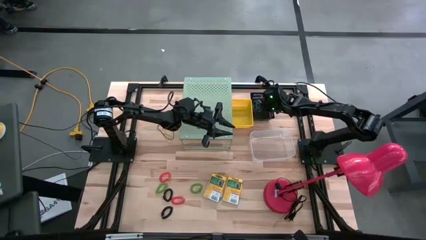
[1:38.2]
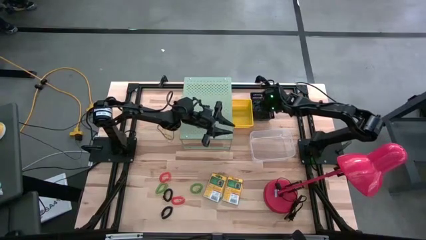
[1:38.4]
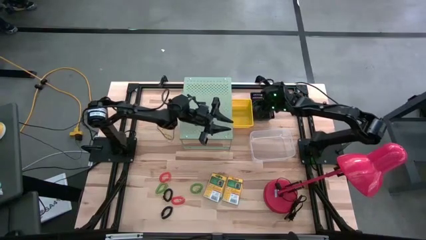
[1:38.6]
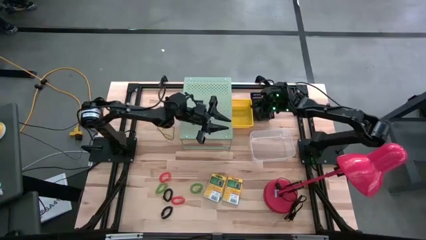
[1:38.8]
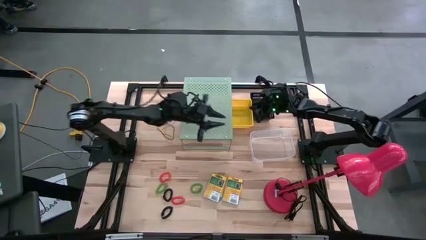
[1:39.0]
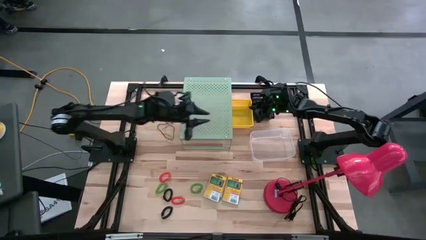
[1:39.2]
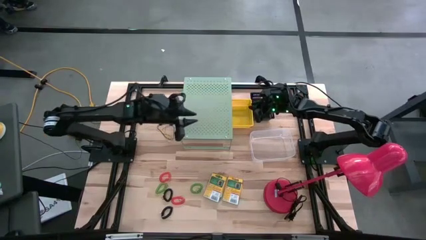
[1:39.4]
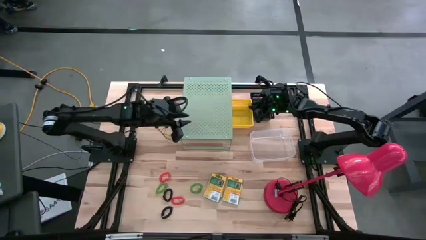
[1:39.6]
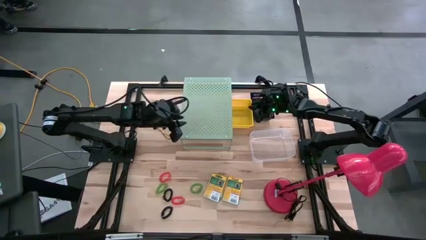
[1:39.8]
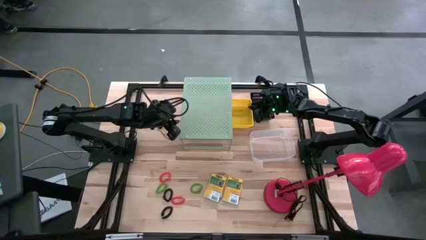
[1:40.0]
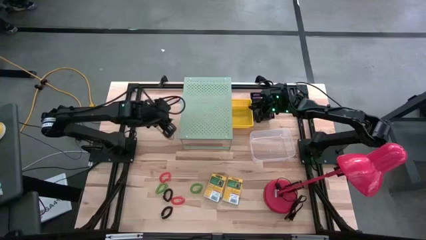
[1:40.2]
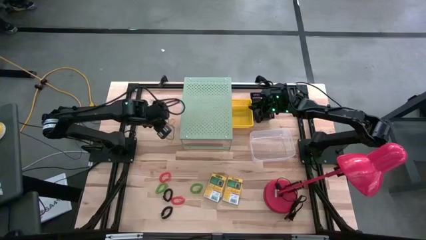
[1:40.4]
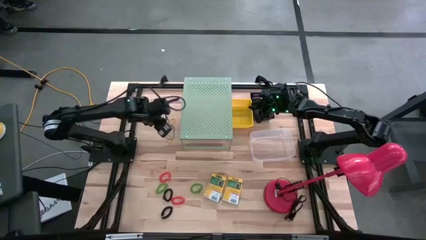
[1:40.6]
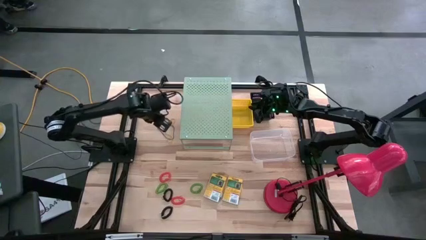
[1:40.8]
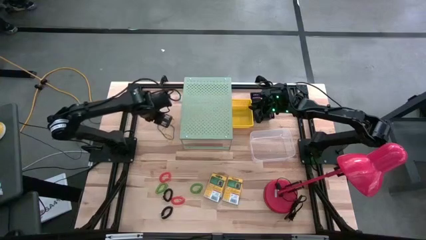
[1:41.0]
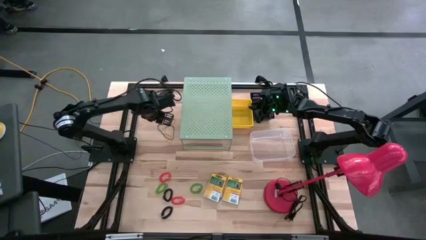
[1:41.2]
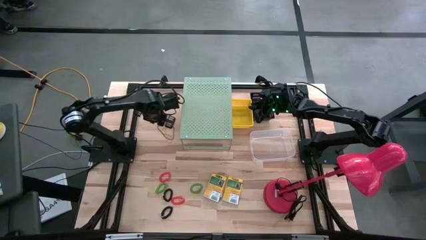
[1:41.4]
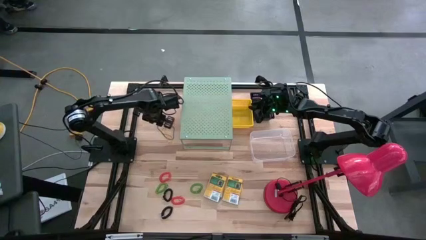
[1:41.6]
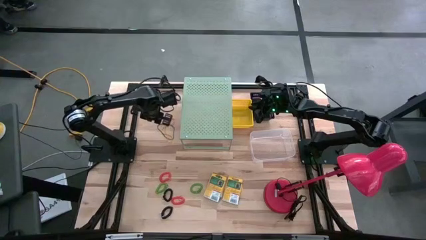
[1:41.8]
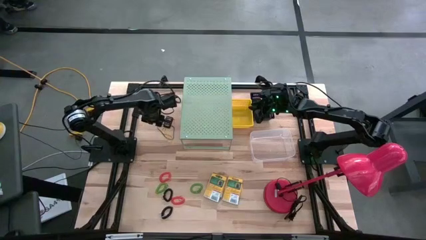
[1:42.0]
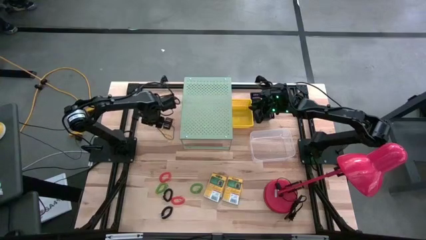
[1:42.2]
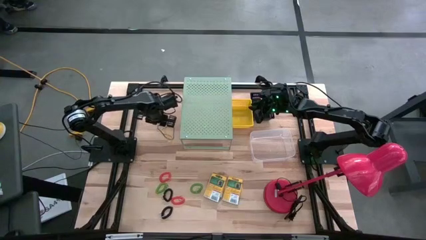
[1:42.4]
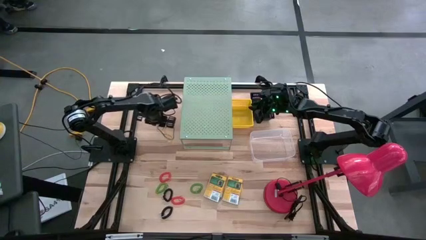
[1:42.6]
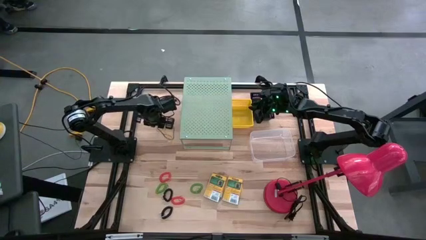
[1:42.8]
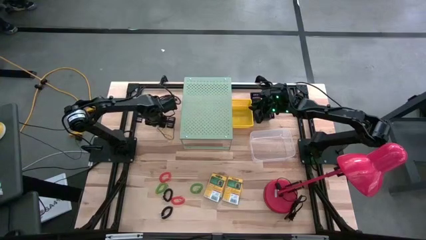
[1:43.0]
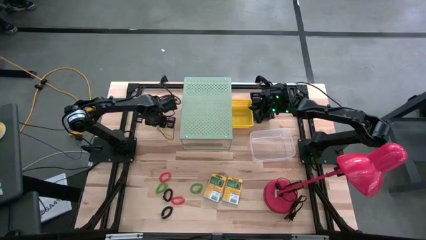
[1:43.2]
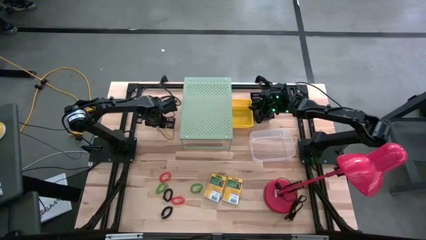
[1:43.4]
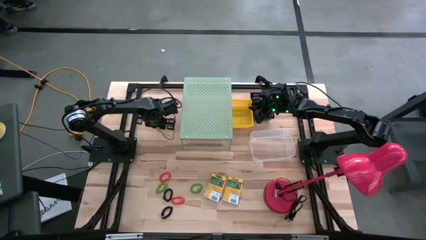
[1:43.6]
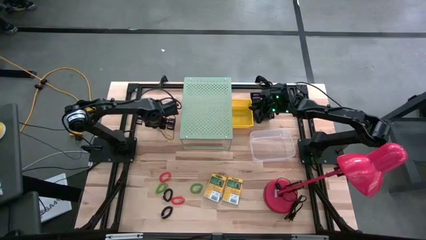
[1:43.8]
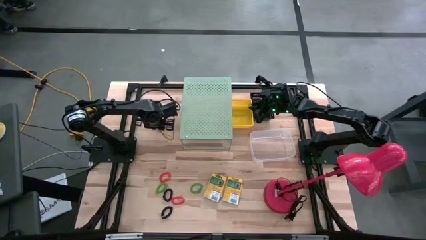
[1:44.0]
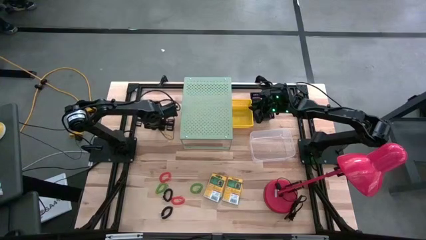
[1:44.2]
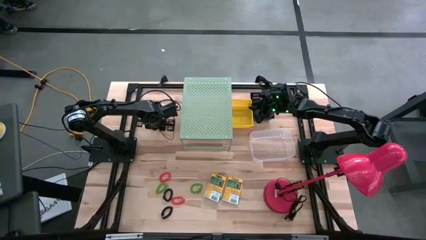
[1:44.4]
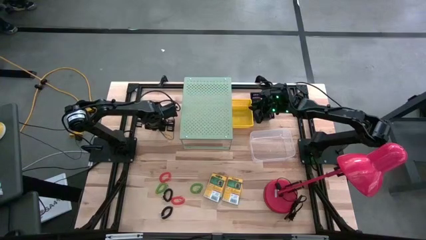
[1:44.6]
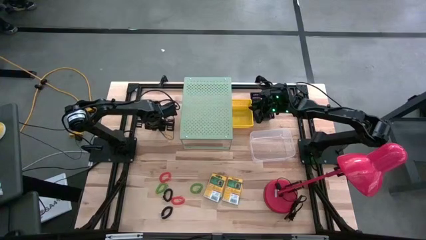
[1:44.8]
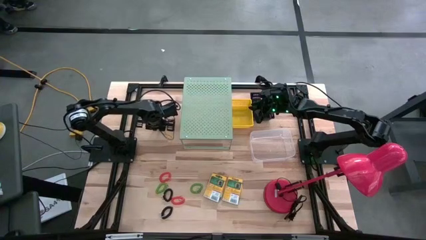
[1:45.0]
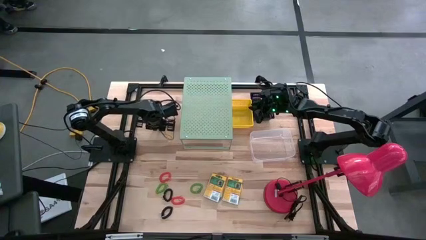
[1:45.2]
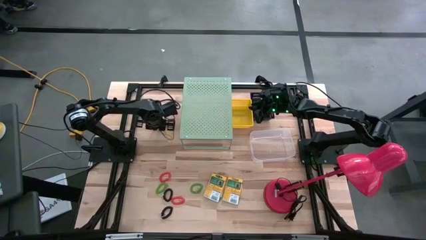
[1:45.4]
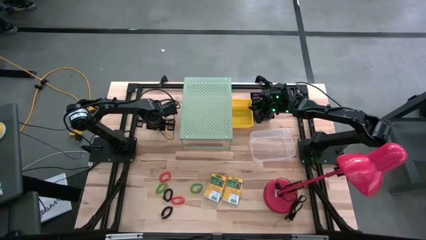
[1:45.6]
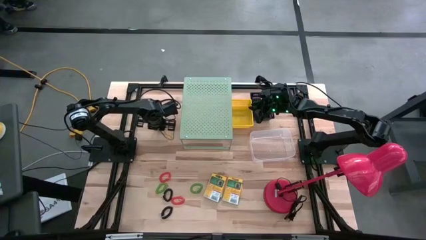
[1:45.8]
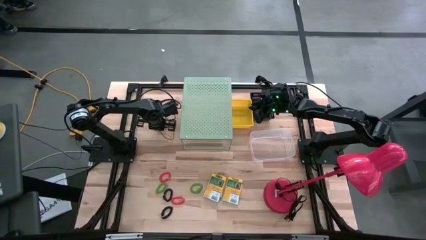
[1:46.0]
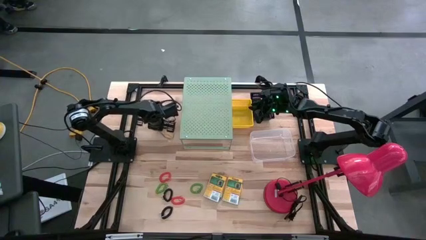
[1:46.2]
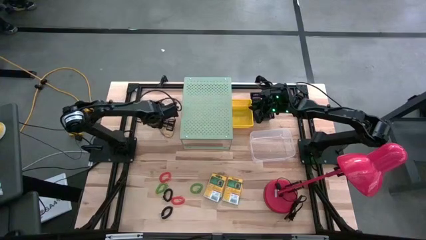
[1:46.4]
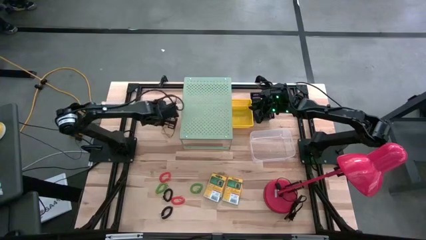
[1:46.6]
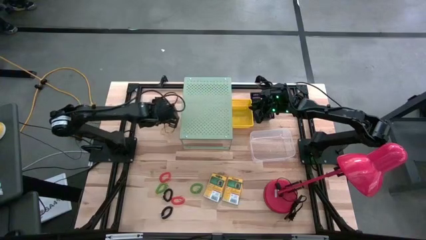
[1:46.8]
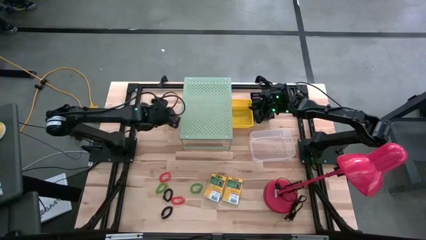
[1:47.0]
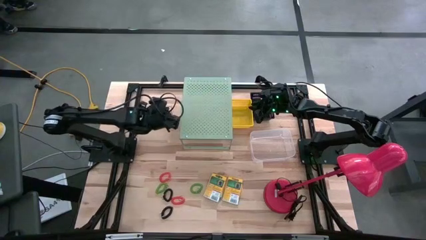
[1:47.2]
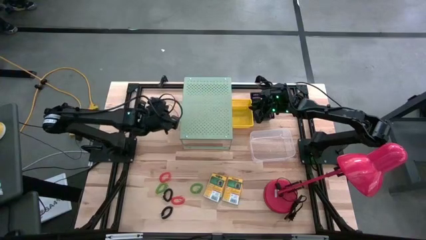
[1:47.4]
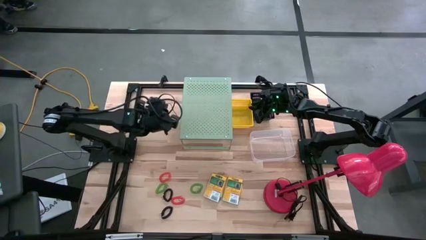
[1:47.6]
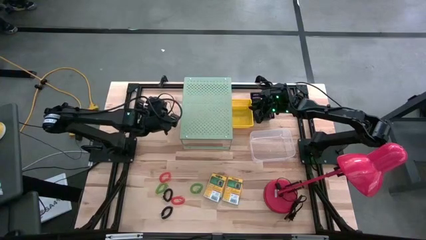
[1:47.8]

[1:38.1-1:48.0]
Task: Pick & Place Office Desk Supplies
Put the purple rubber band into the black bin
